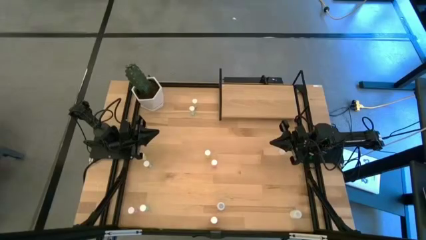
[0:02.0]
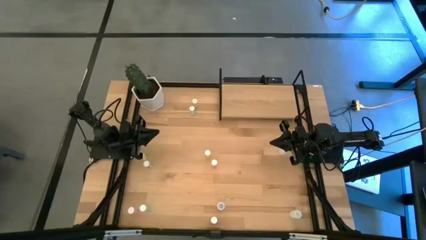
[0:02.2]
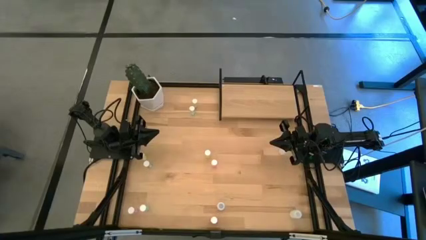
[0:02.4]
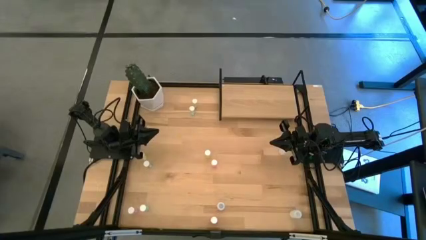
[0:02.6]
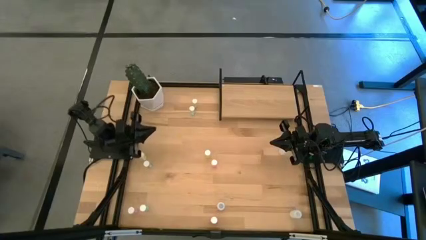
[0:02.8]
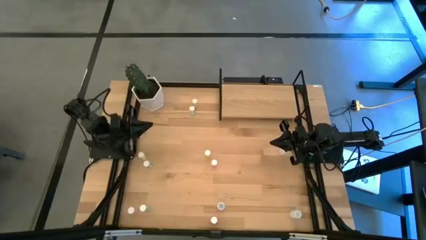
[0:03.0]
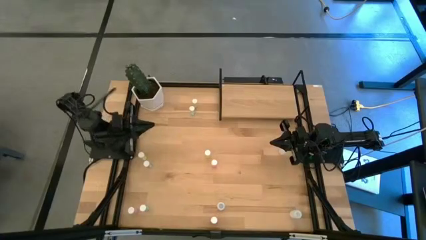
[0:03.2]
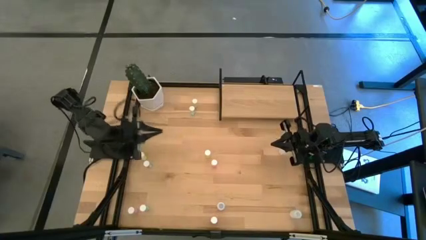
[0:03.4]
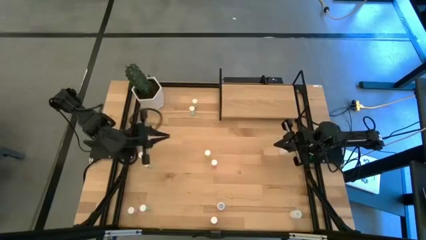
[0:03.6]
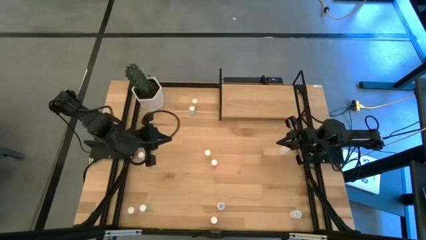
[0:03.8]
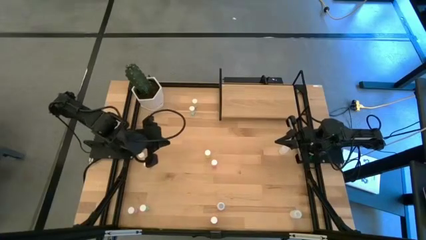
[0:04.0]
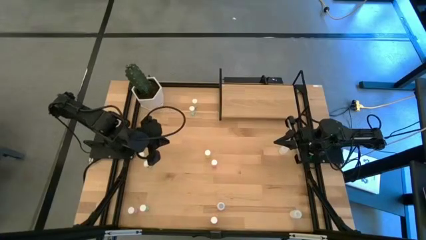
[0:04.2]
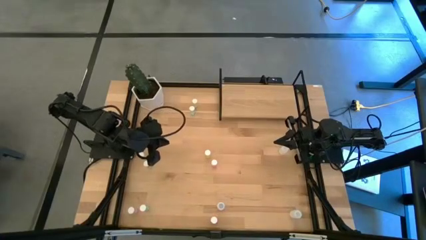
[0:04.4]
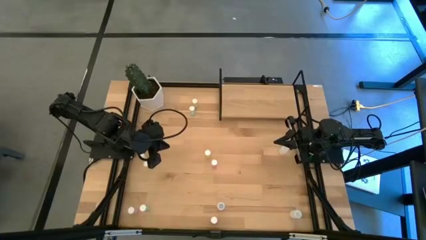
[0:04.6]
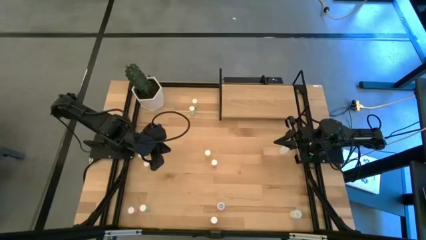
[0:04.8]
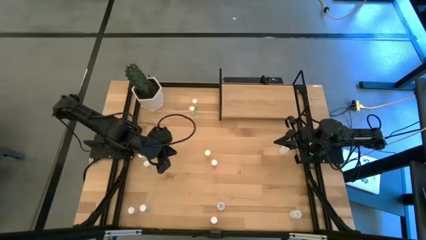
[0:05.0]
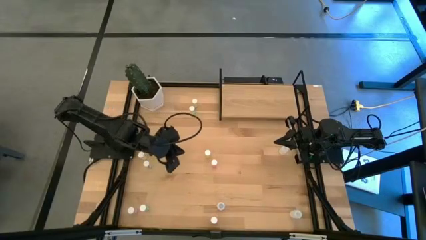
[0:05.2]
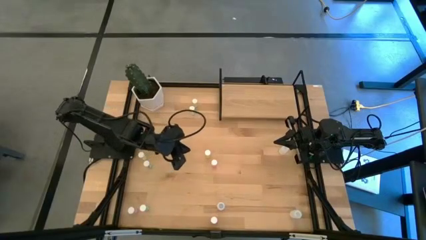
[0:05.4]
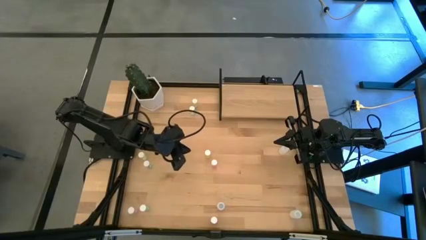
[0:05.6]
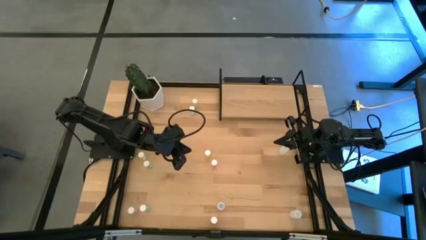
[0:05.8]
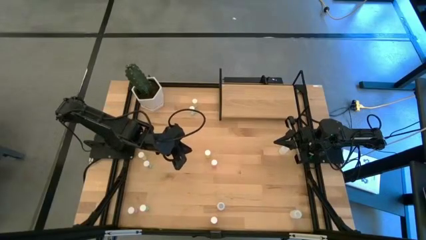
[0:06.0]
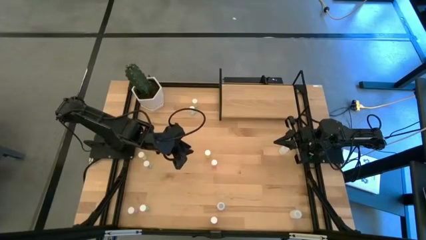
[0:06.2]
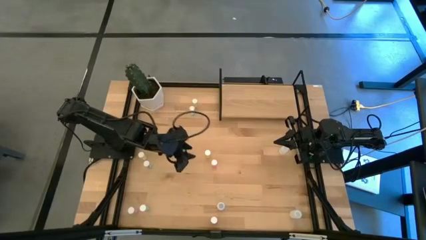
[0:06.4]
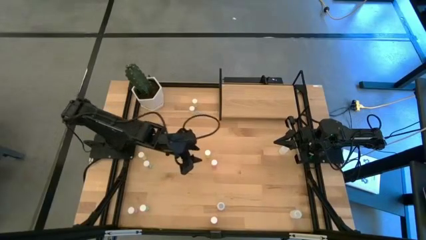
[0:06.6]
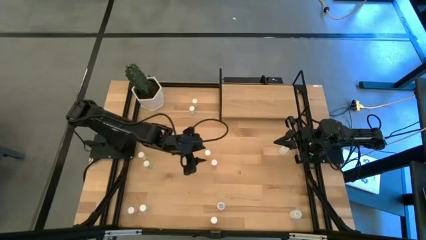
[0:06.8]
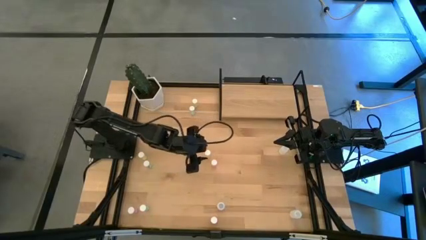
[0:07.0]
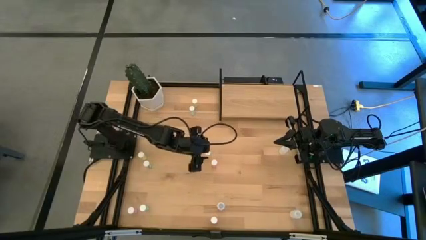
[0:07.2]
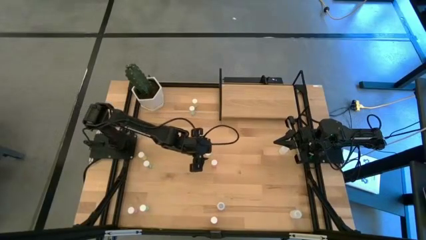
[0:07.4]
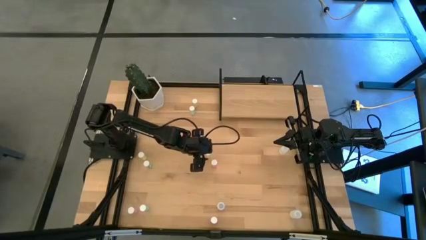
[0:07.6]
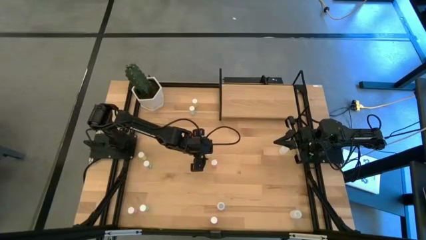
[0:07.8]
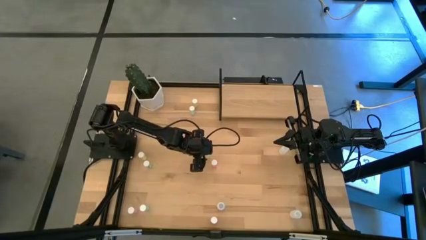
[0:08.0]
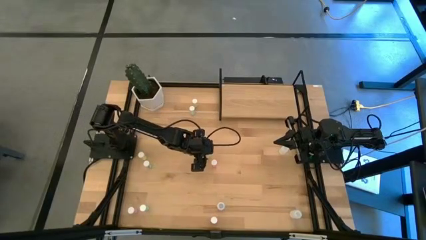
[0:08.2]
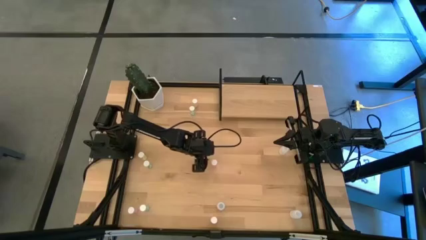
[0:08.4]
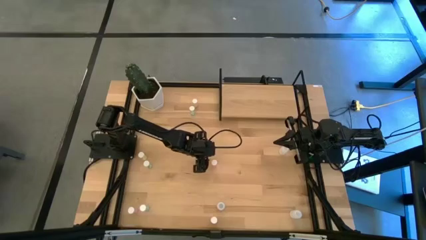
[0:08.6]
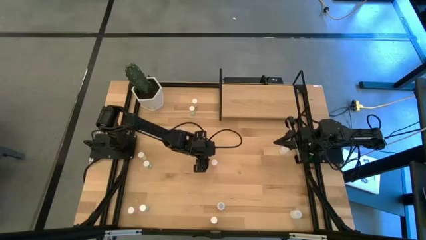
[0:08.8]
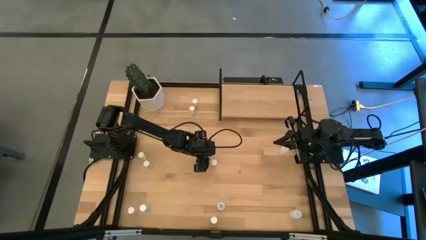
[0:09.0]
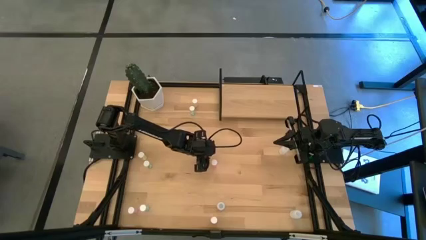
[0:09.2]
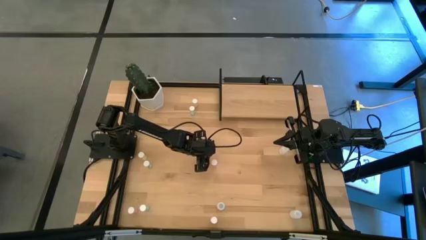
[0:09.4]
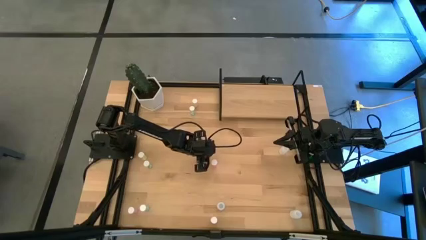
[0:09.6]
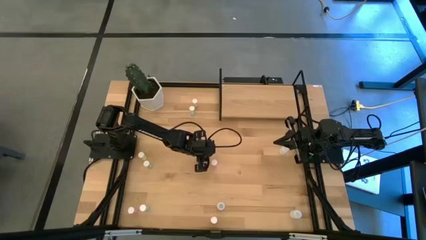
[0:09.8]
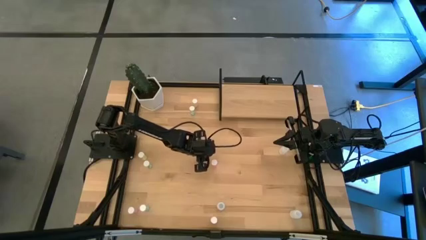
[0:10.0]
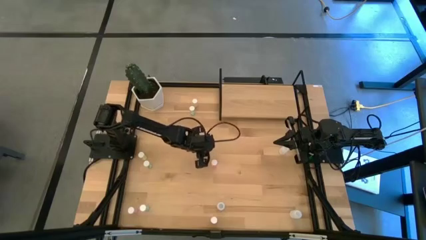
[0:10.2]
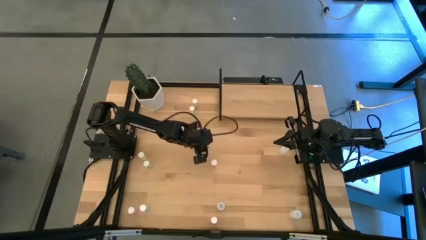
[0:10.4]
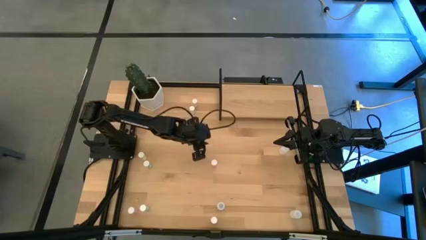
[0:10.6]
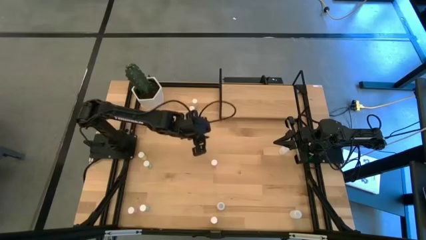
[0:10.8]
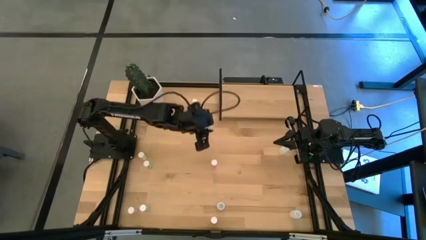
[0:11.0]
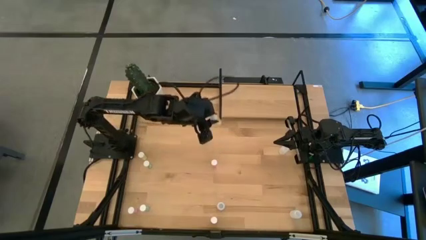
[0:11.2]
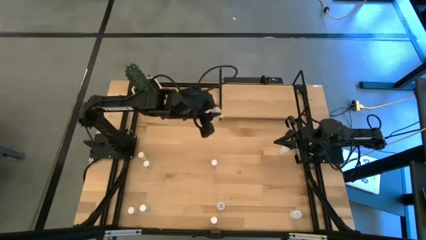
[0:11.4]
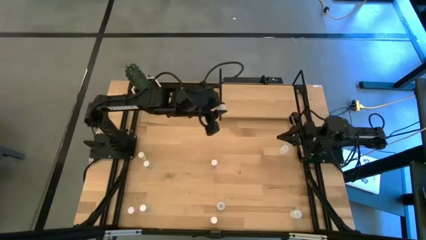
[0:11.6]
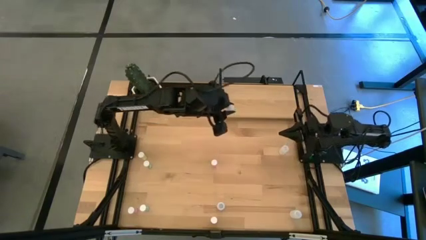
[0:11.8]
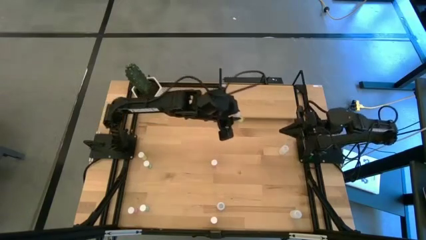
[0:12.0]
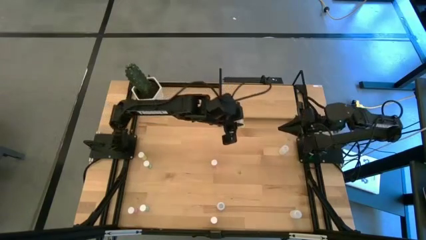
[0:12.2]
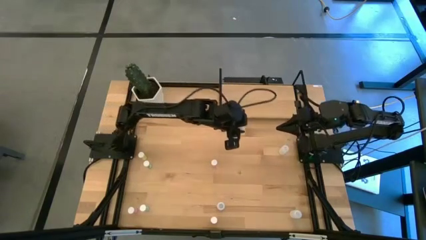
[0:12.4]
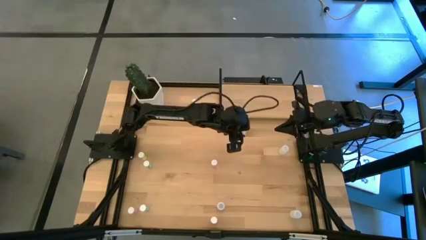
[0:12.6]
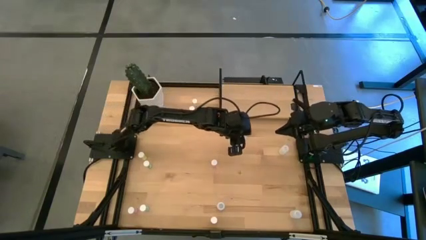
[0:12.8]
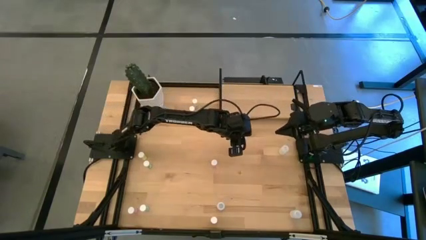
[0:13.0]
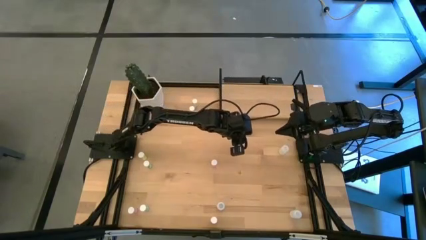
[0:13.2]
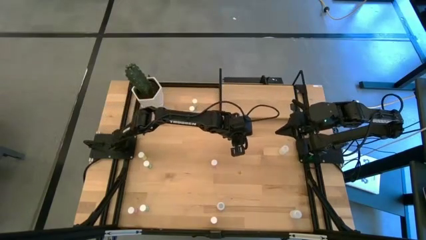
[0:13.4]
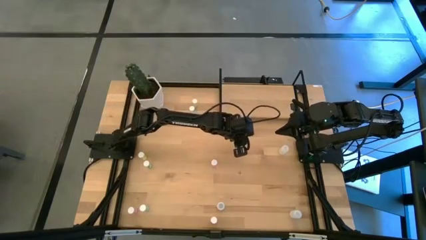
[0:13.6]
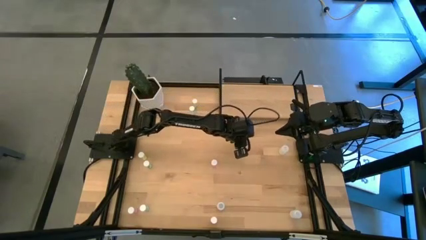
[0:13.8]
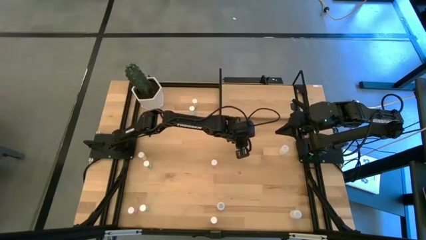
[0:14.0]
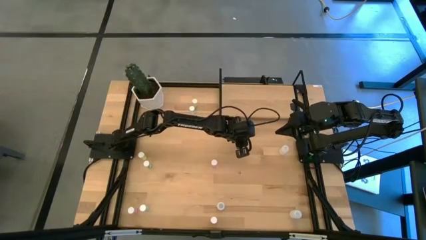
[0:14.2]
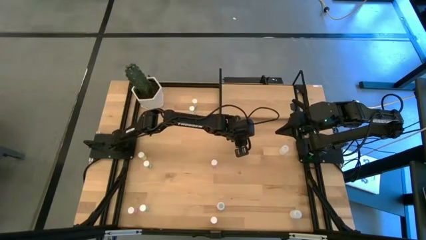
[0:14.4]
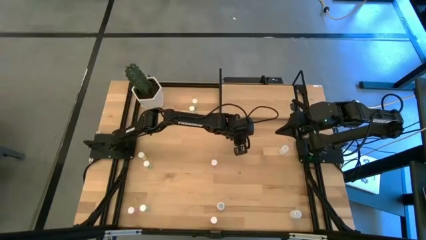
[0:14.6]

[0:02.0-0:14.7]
Task: Pick and place medicine bottles onto shelf by color
Put the bottom right yellow pill bottle on the shelf

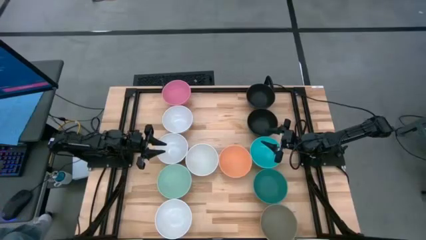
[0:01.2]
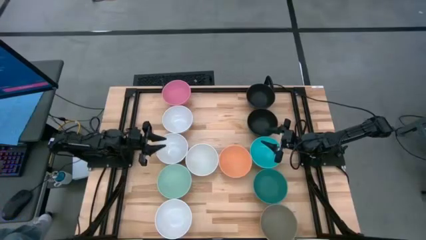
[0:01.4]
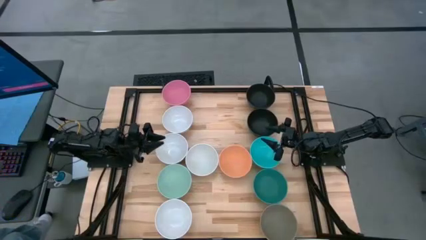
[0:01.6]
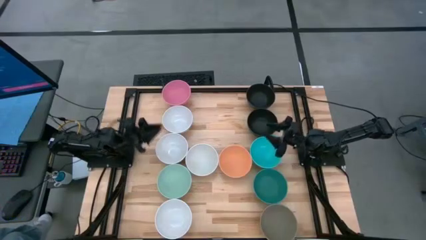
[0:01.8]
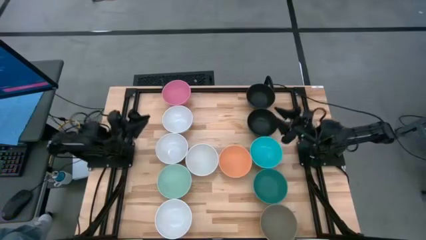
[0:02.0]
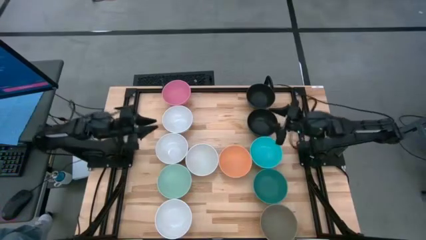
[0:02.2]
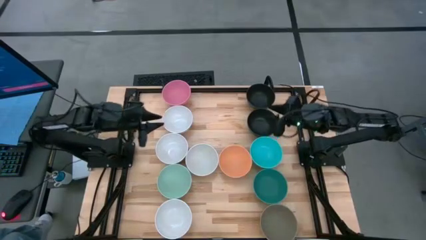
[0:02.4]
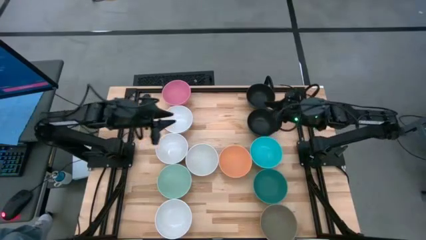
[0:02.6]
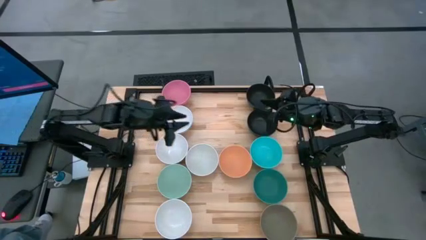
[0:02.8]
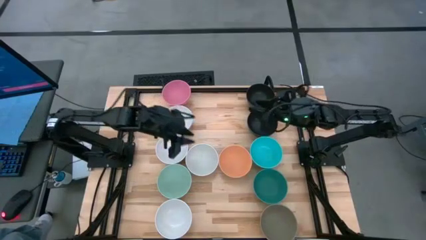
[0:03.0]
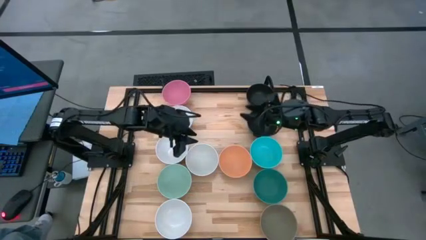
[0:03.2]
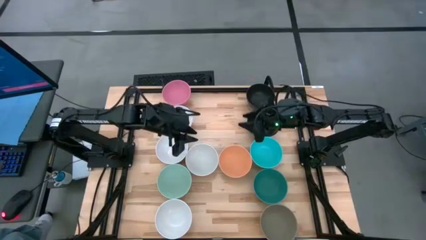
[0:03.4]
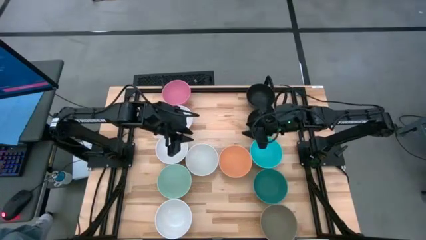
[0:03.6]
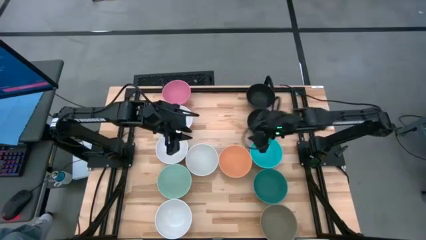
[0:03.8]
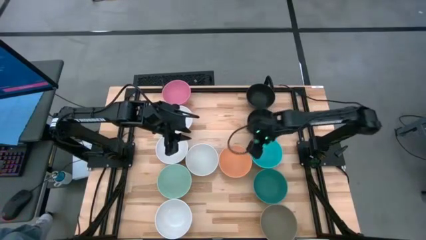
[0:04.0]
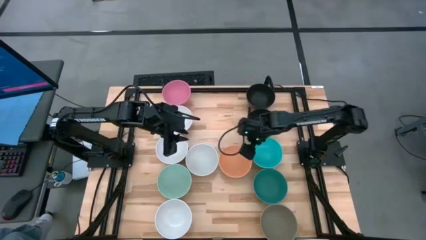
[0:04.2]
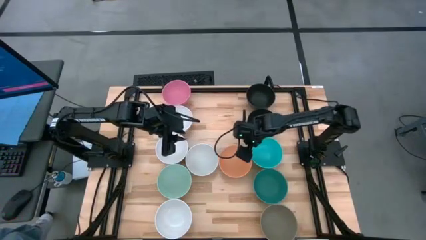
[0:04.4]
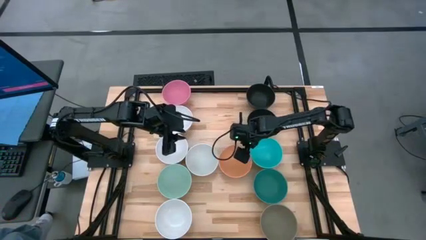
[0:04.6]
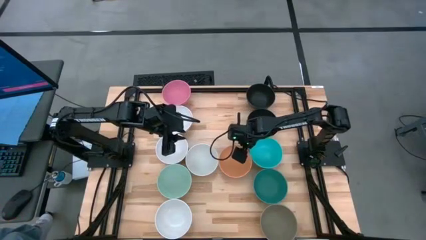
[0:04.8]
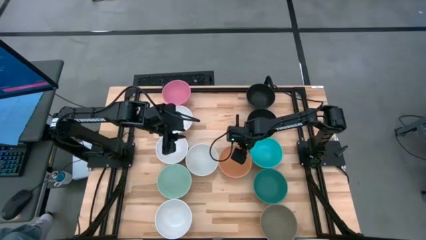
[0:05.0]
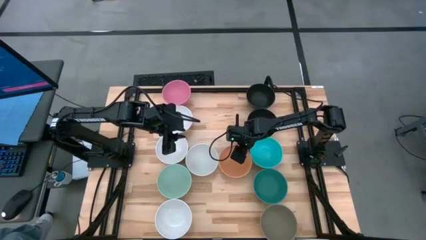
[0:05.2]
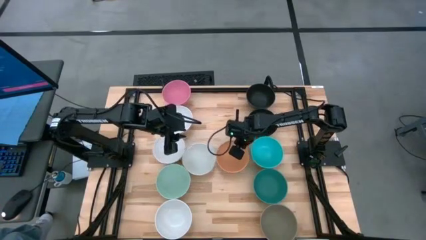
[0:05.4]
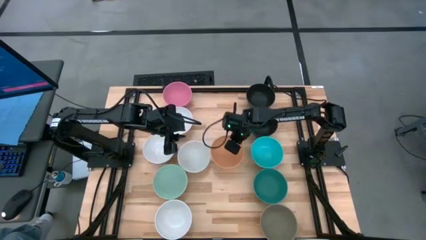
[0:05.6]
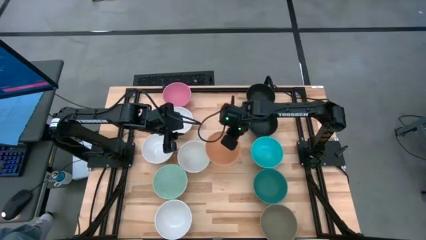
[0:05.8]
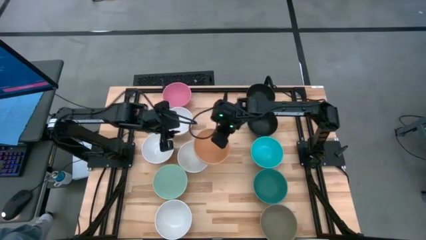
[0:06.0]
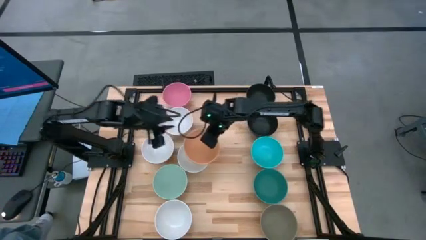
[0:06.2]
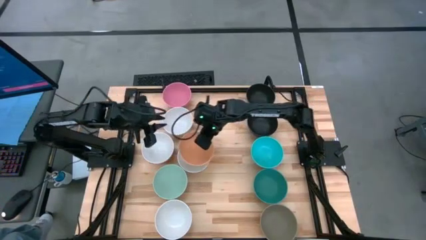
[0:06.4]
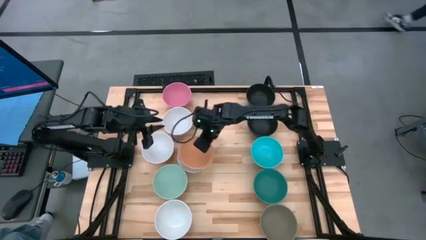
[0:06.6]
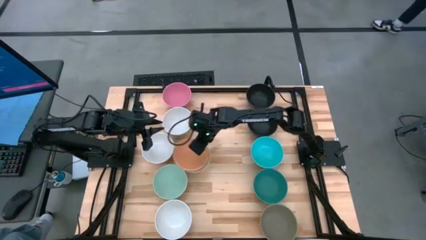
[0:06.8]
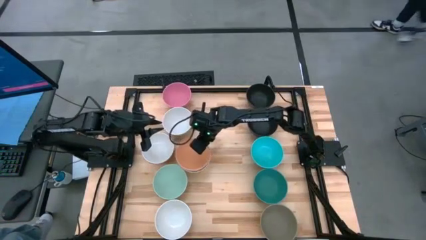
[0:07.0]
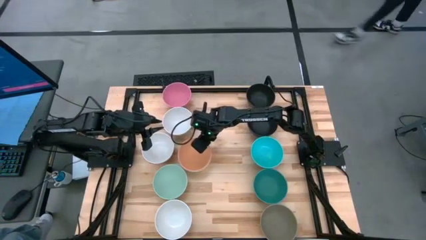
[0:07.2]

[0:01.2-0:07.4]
Task: Nest bowls inside each other
Stack the orange bowl on the white bowl
